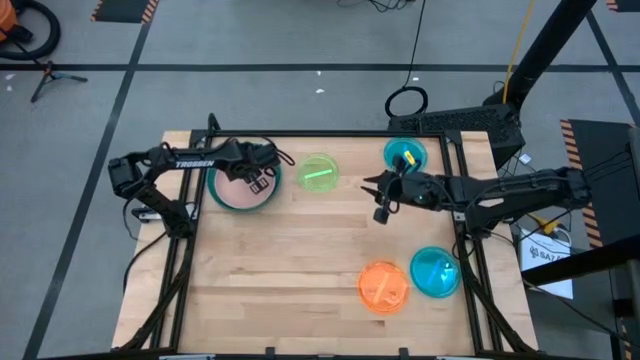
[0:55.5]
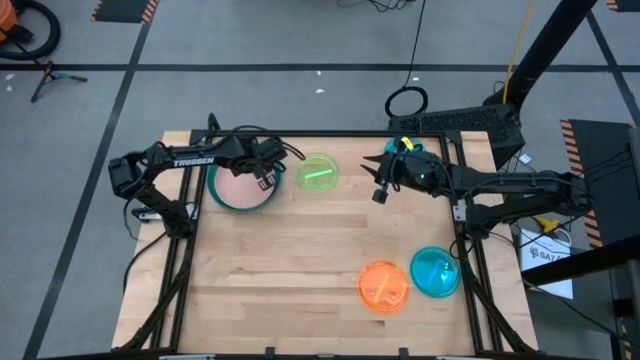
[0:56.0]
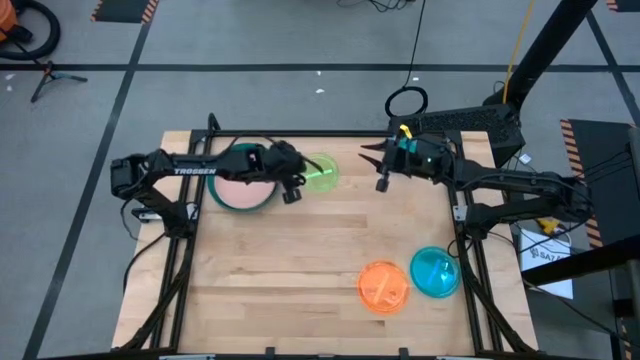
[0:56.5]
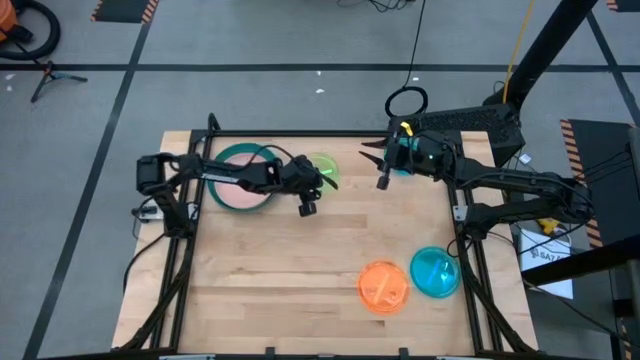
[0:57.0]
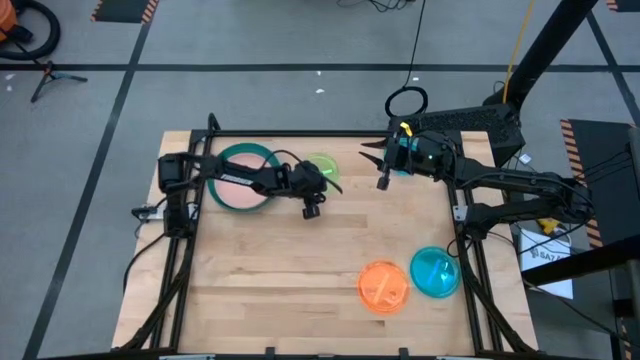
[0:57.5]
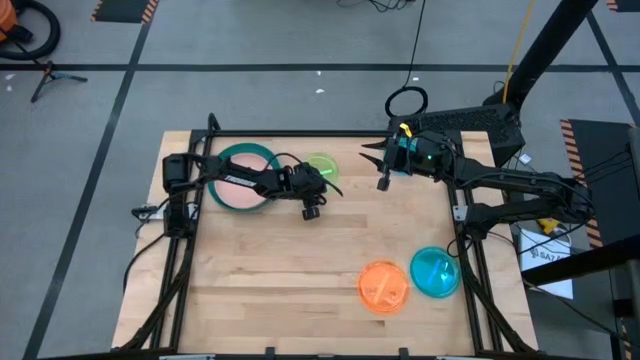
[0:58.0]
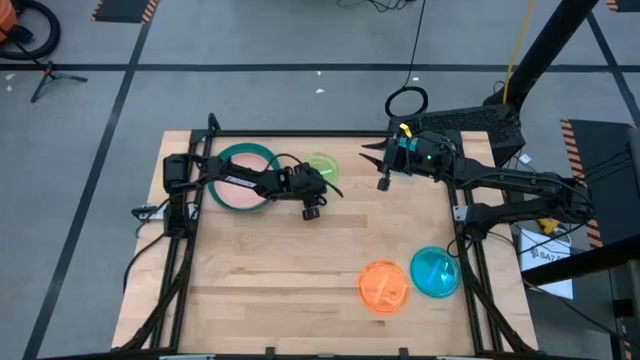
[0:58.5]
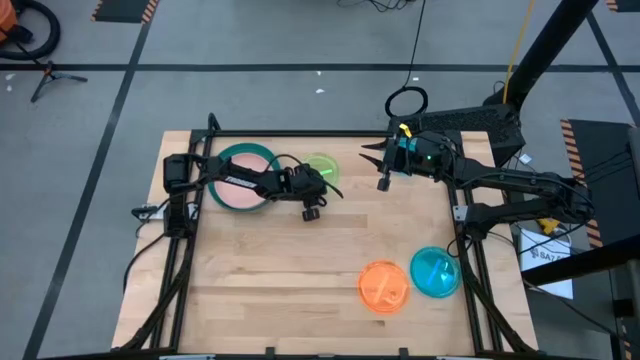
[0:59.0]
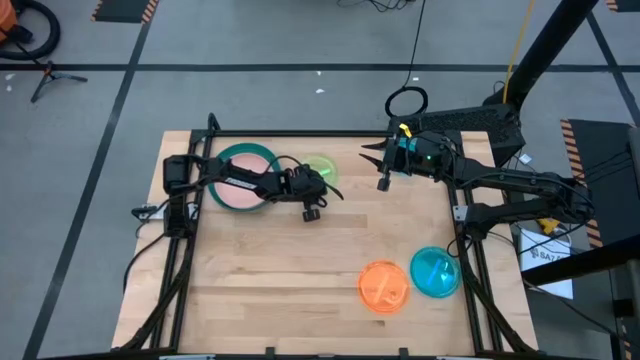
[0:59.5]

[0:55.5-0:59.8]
Task: Stack plastic plates
Stack the green plate on top of the pink plate

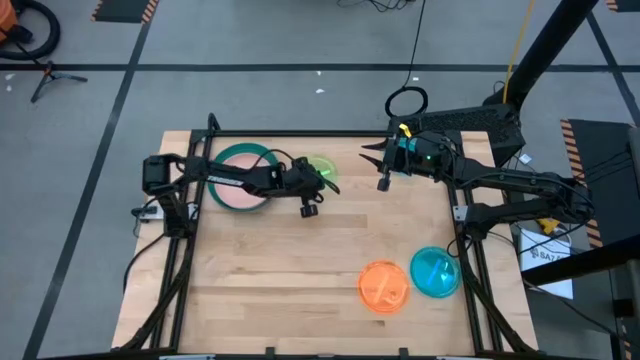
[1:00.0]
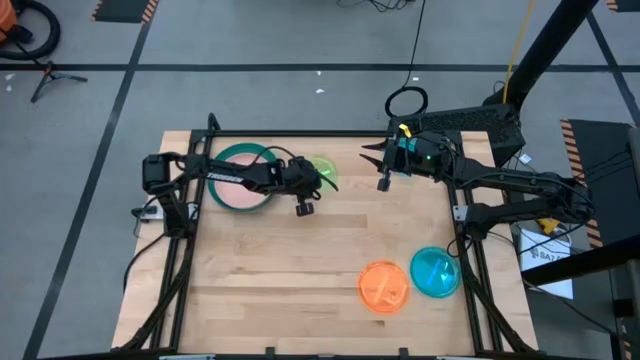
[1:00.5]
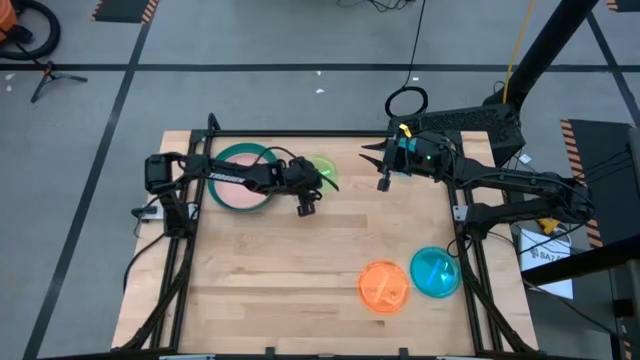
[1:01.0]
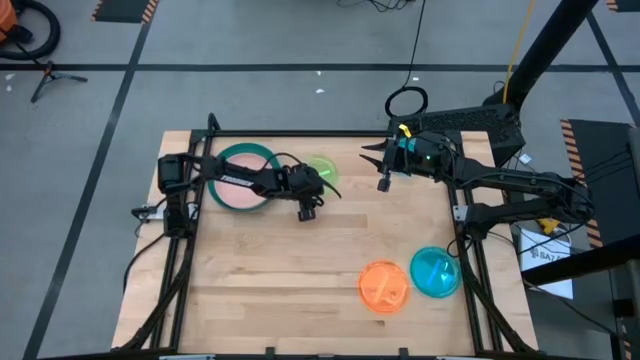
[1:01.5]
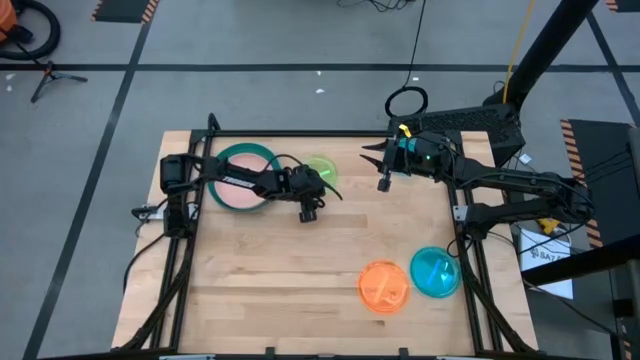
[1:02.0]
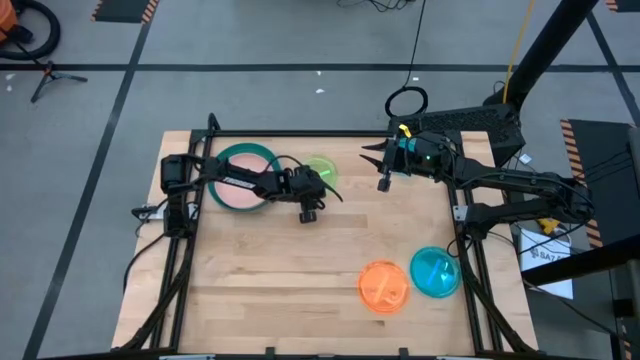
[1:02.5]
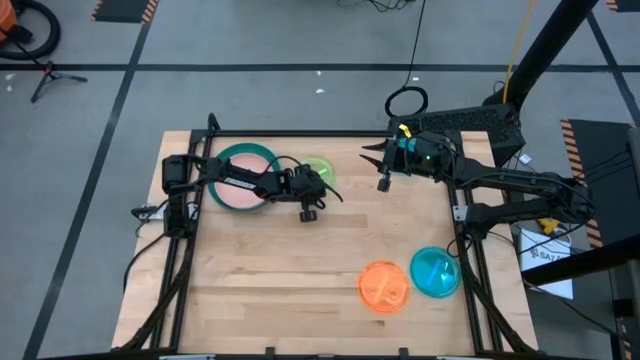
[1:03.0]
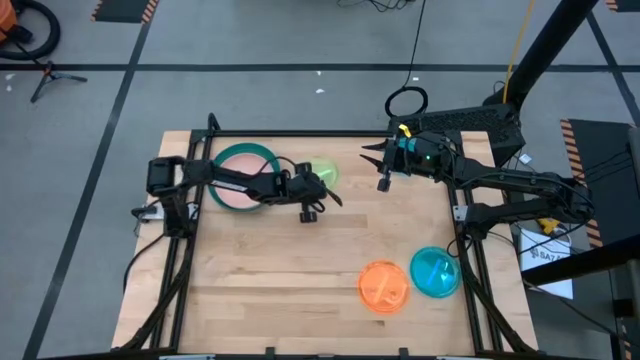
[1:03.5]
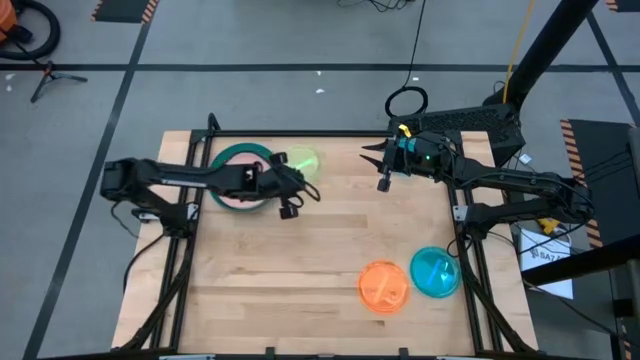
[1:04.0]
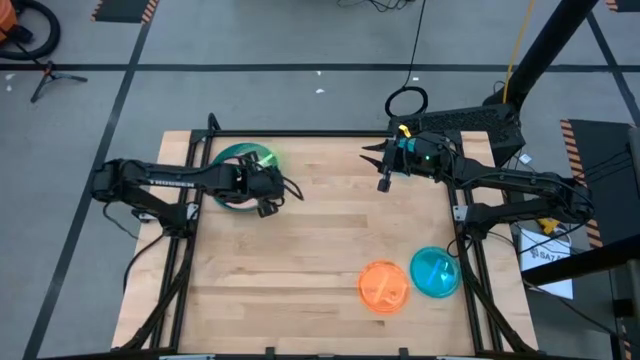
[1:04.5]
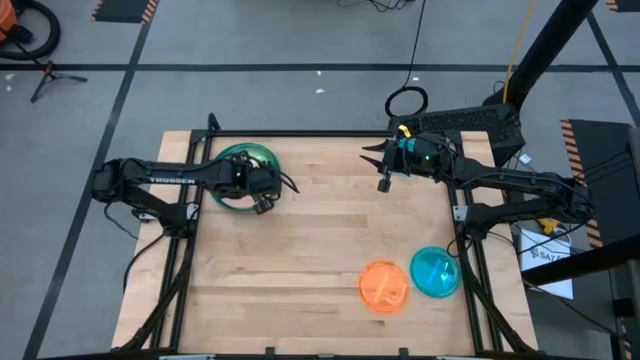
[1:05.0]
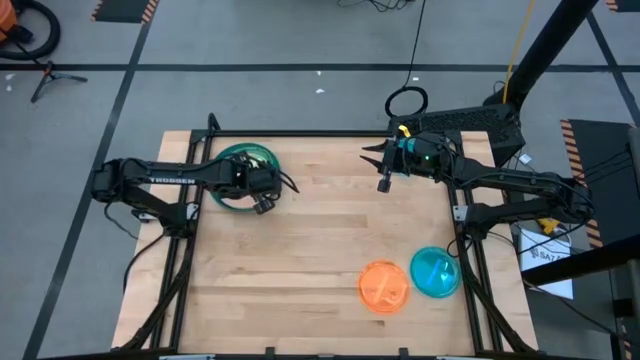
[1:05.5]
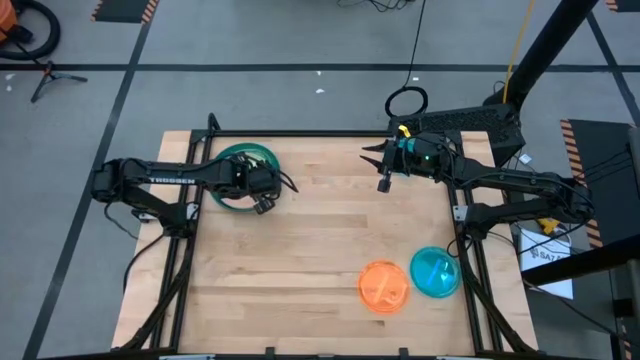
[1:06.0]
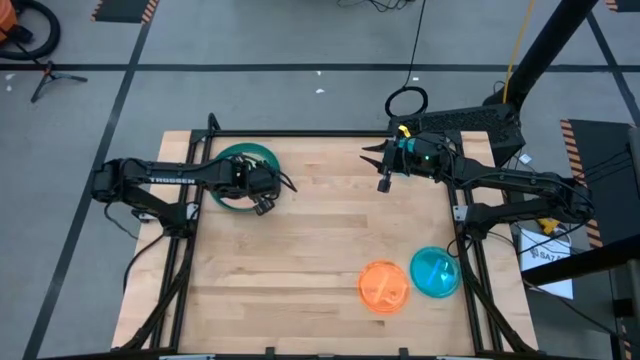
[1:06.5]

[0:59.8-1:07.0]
Stack the green plate on top of the pink plate

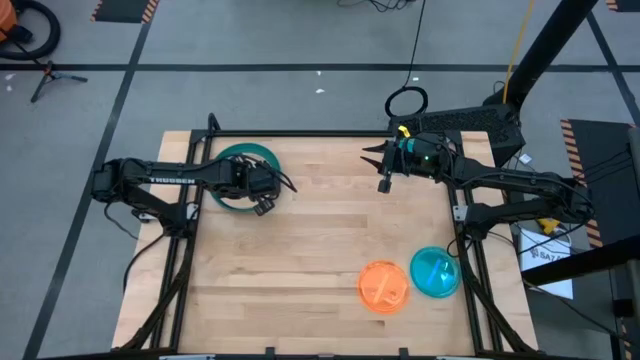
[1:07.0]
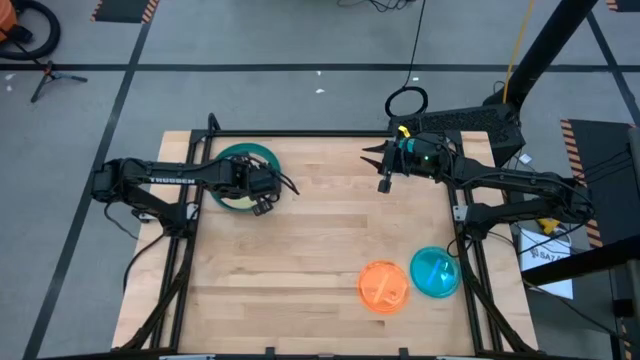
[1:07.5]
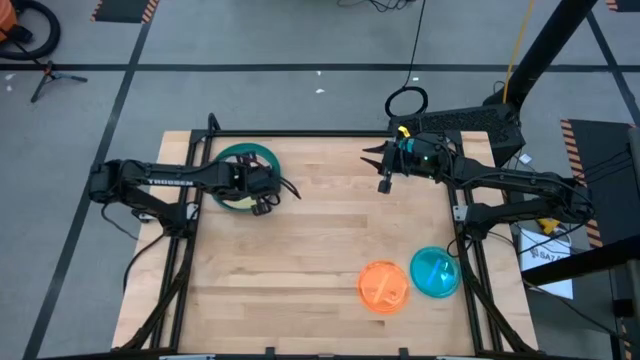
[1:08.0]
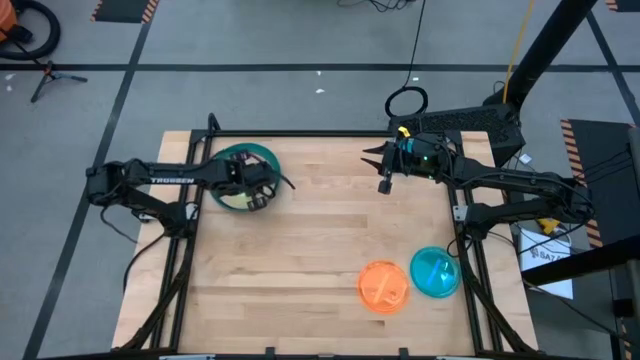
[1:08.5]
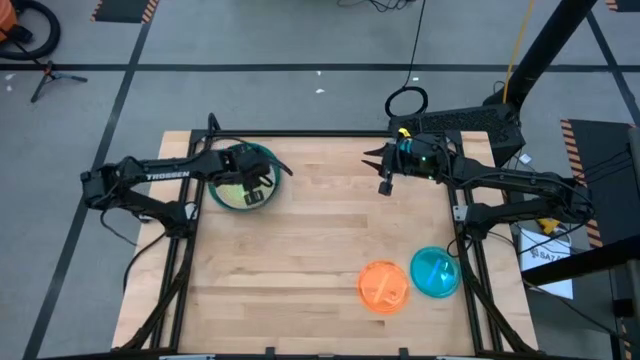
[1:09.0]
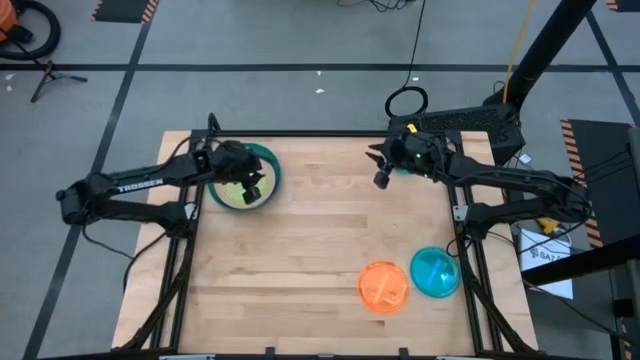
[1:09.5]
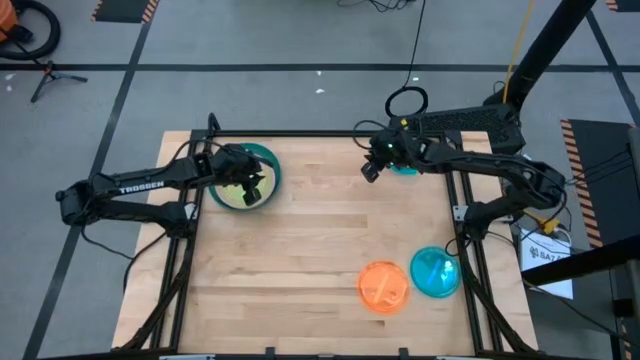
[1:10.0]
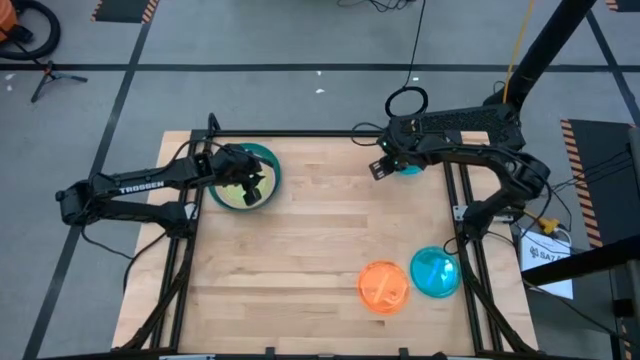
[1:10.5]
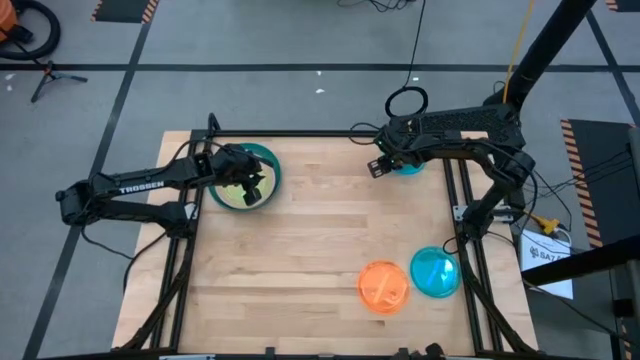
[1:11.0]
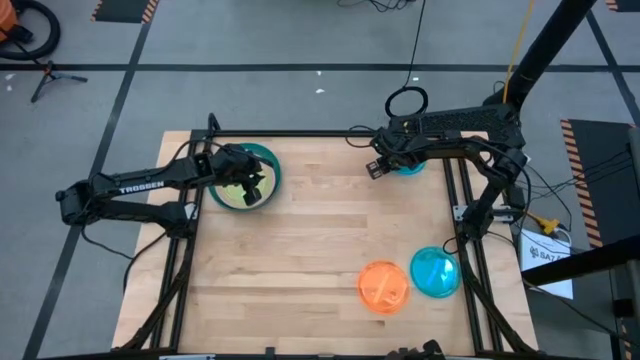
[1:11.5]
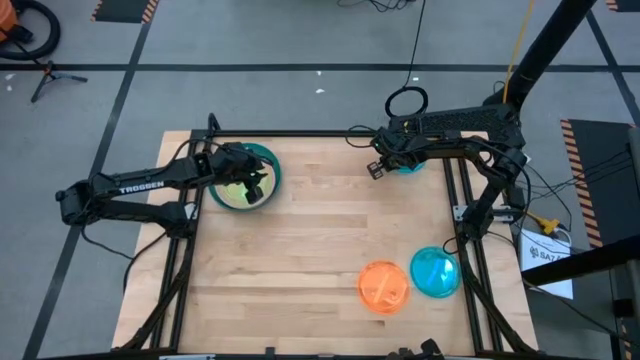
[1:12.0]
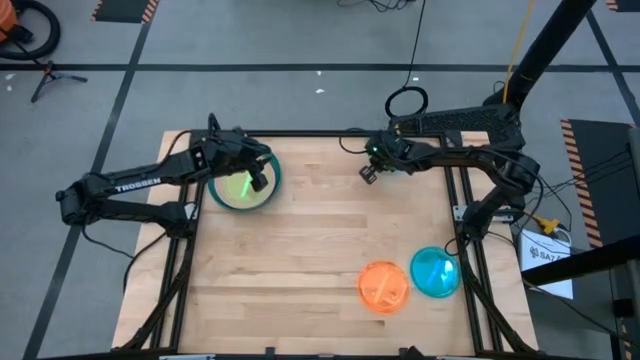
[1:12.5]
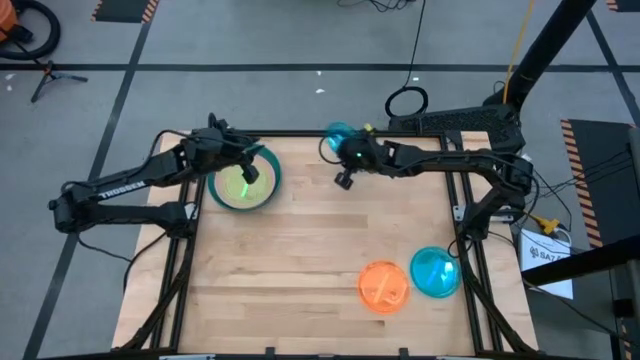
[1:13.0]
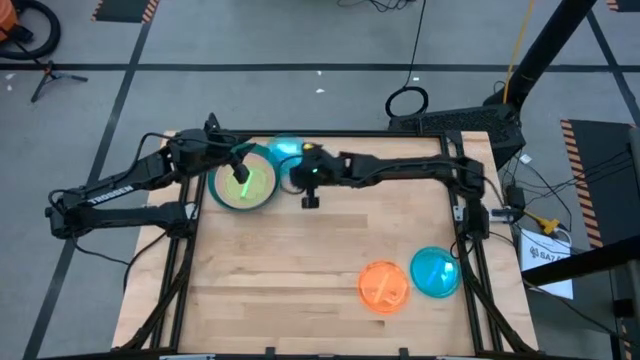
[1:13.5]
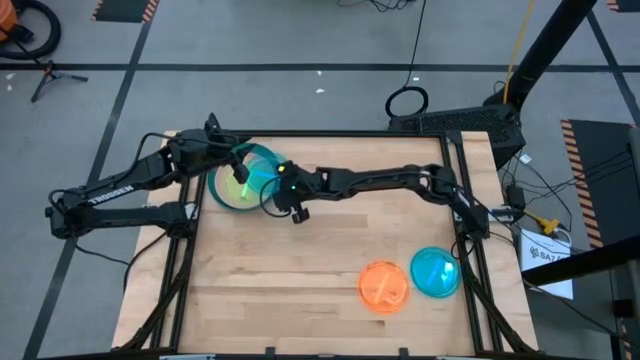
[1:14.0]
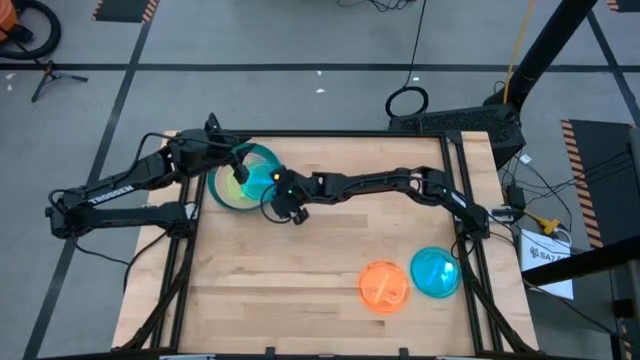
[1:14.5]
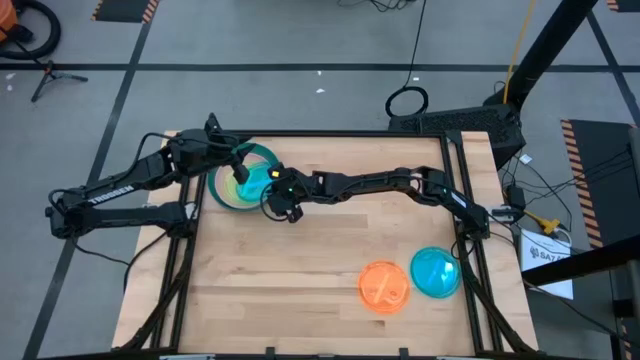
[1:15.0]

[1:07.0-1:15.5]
Stack the top blue plate on top of the green plate
